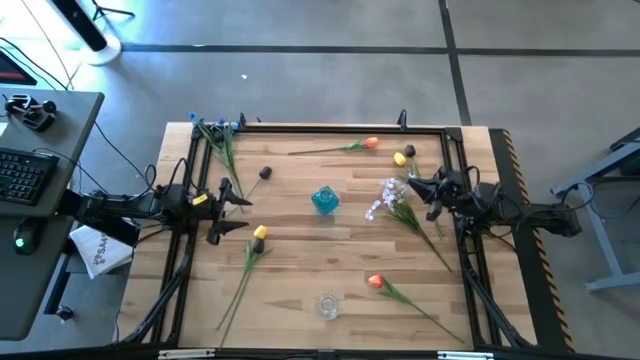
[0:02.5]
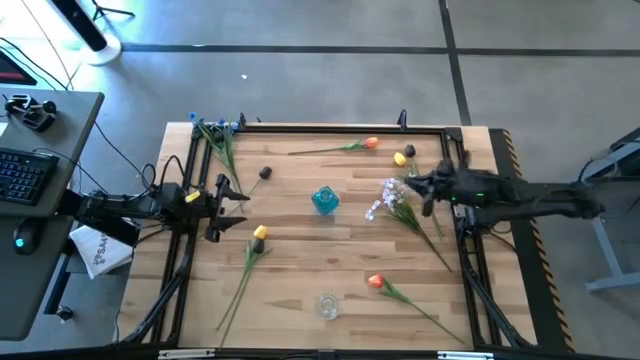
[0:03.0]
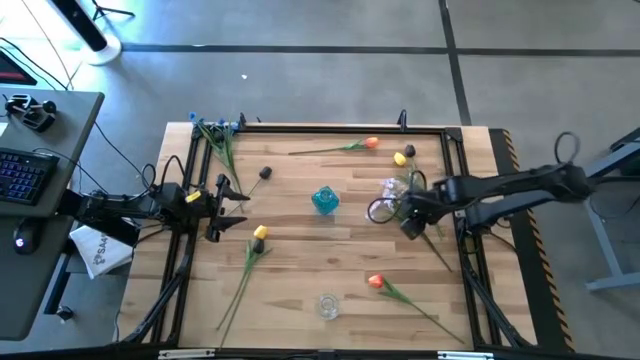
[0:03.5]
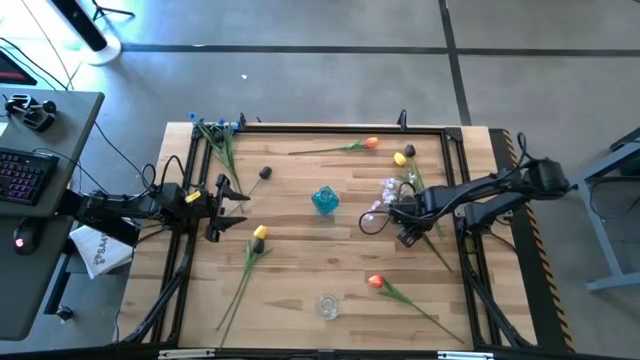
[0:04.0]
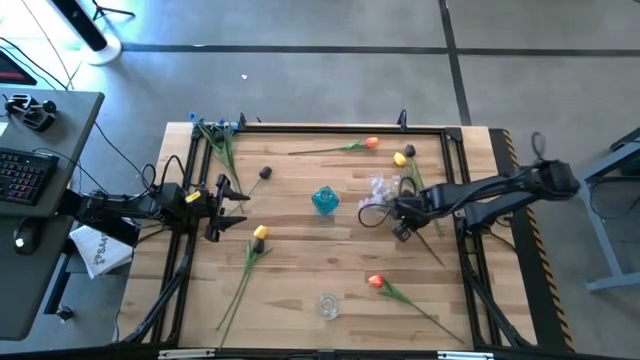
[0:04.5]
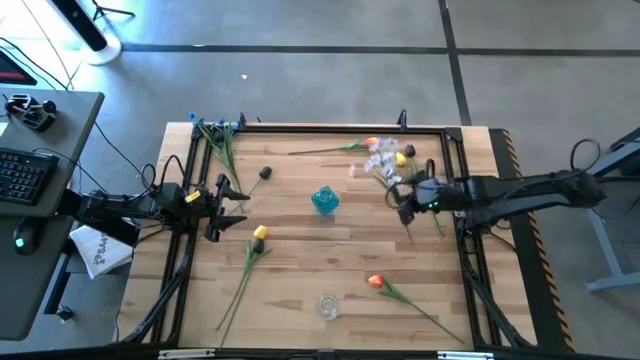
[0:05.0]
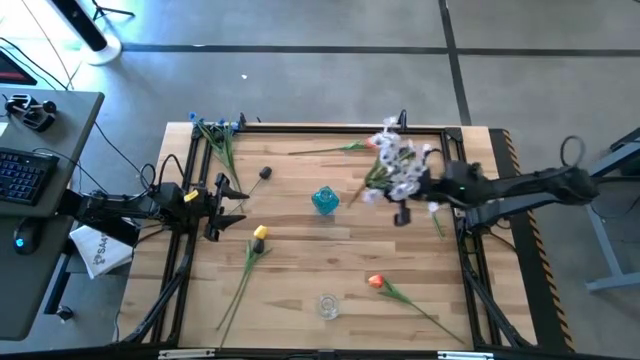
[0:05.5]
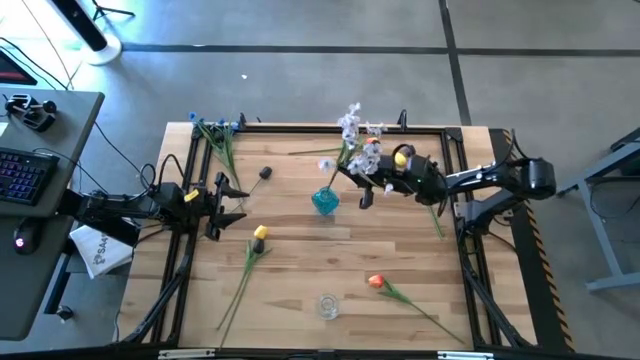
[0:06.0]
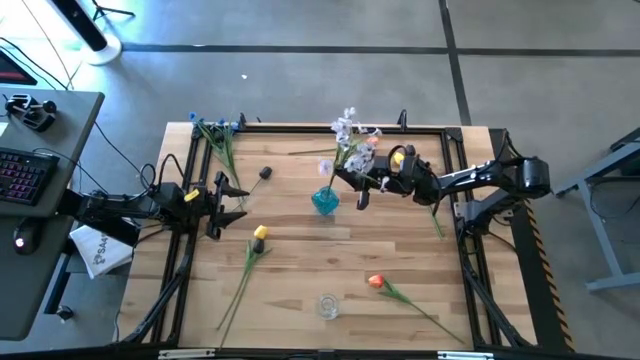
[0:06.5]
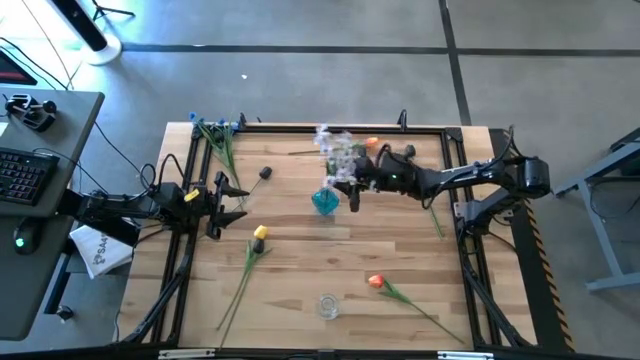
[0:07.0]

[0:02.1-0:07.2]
Task: Sort flowers into vase by color
Put the white flowers into the blue vase

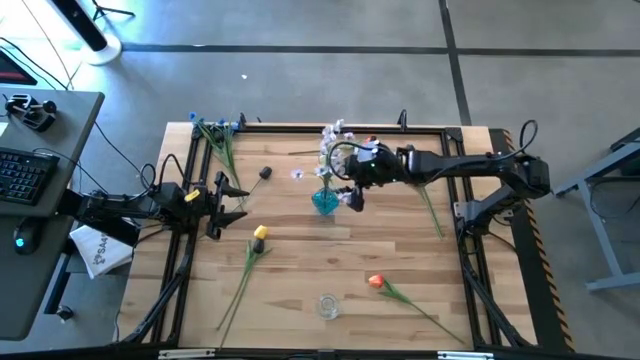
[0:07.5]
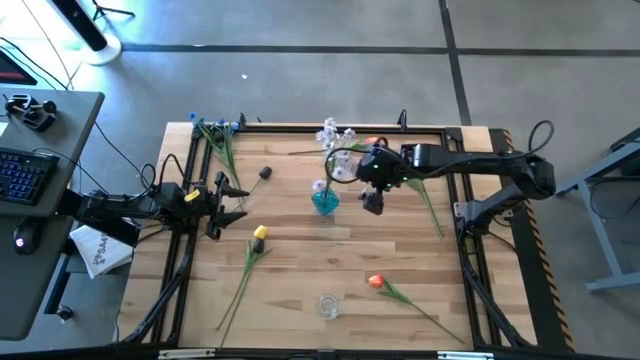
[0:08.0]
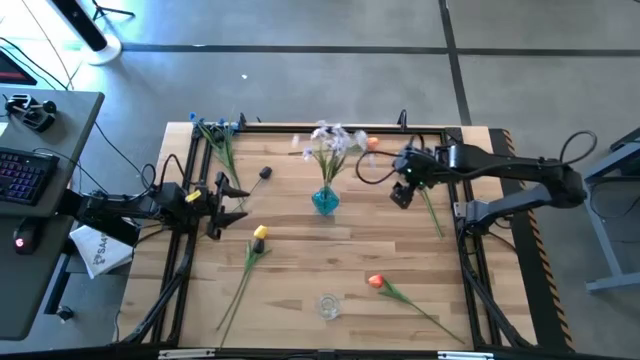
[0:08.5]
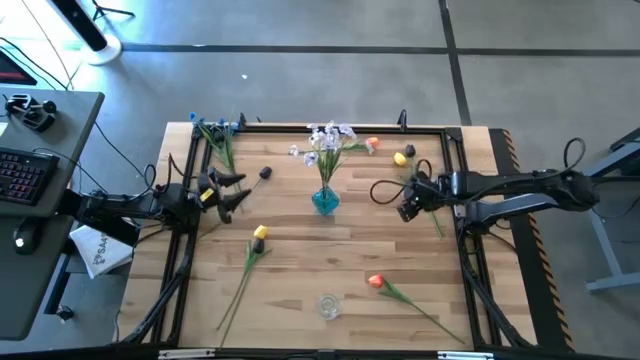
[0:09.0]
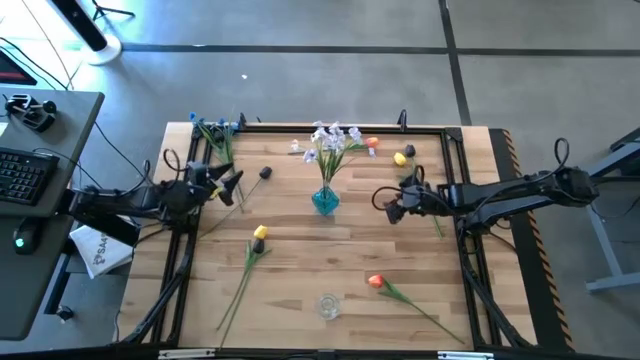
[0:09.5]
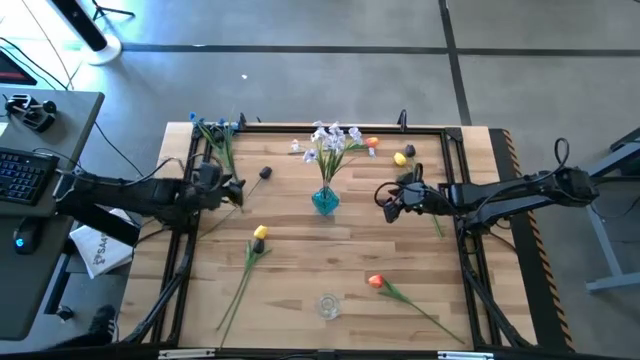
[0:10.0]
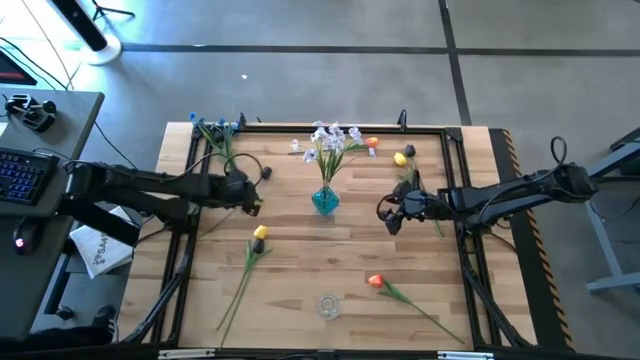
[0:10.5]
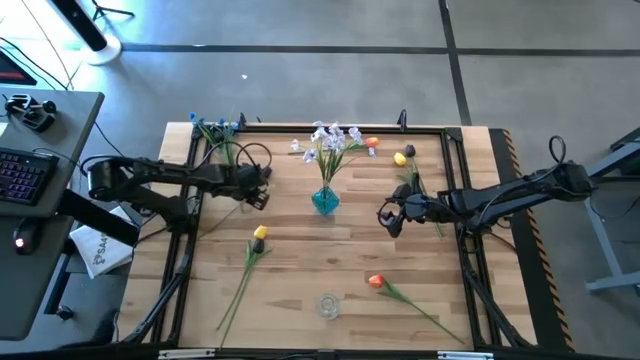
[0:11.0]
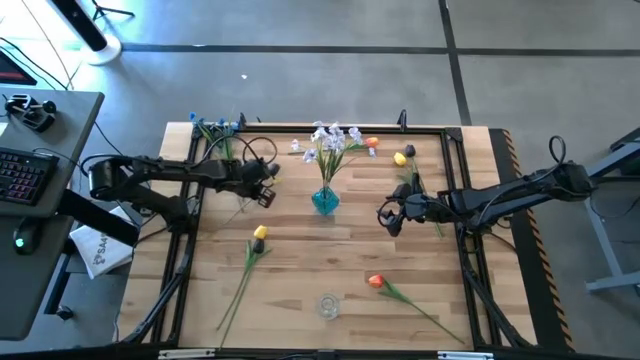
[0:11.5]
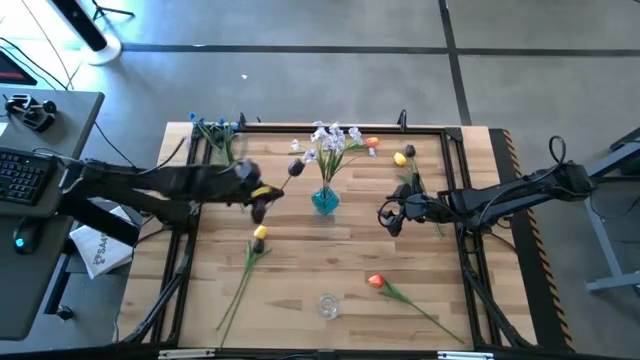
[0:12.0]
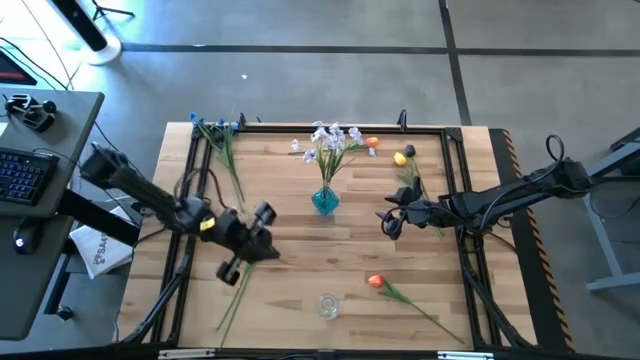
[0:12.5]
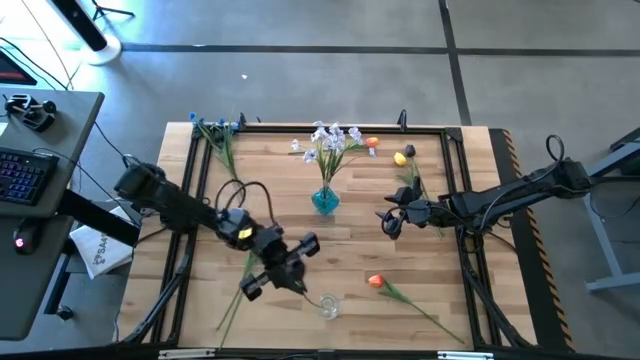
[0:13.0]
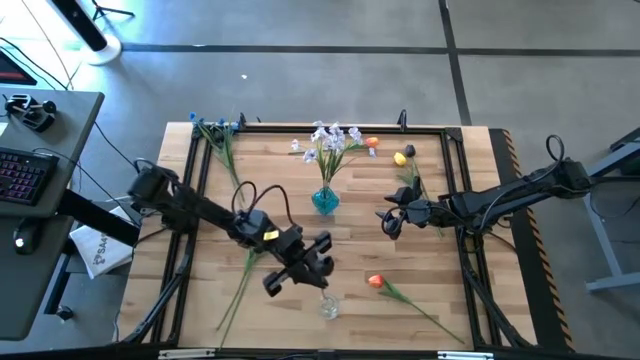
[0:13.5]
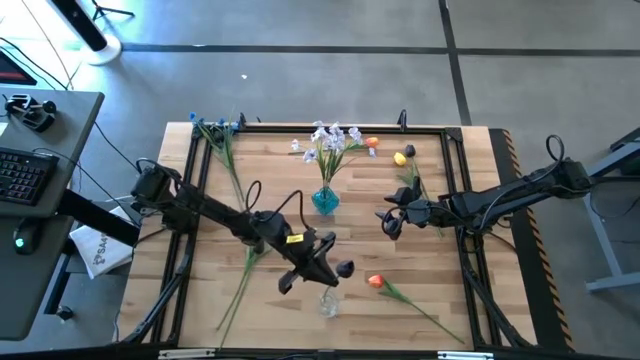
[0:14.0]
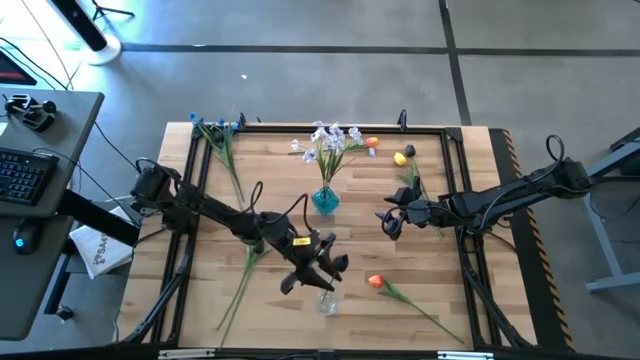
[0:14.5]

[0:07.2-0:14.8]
Put the middle black tulip into the transparent vase

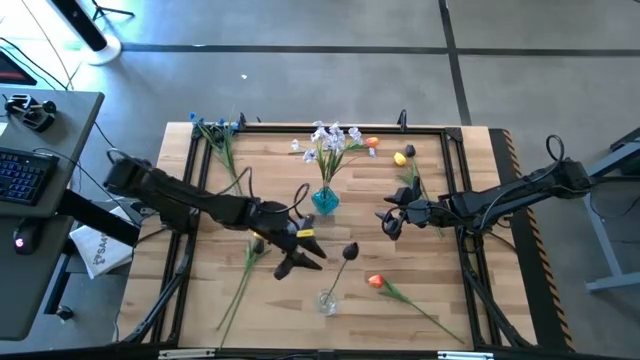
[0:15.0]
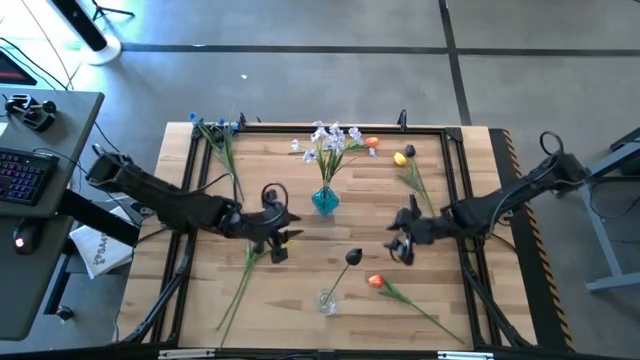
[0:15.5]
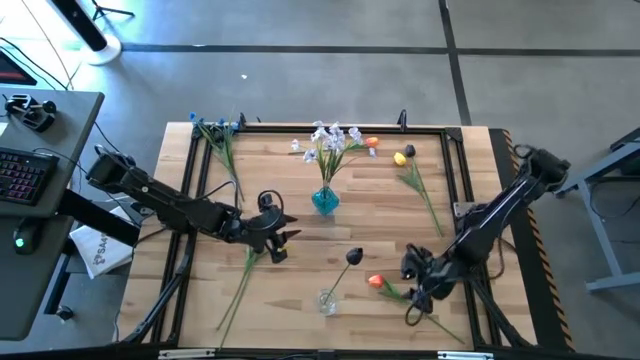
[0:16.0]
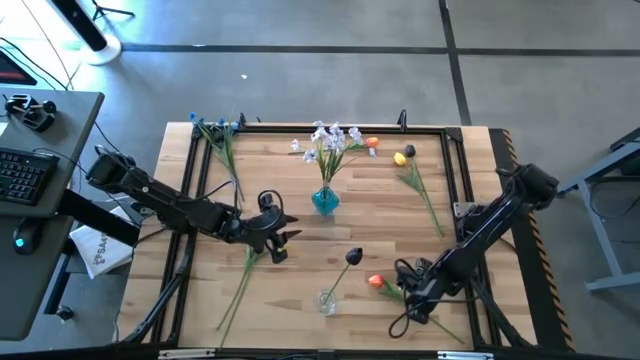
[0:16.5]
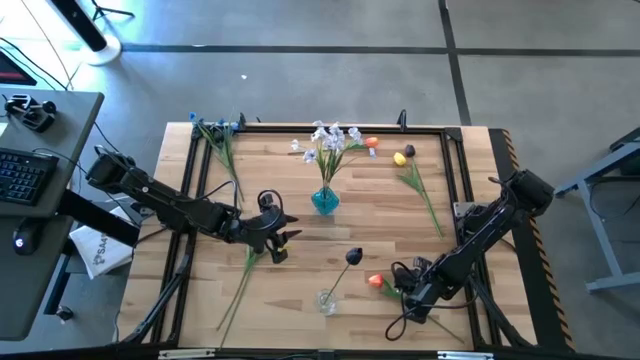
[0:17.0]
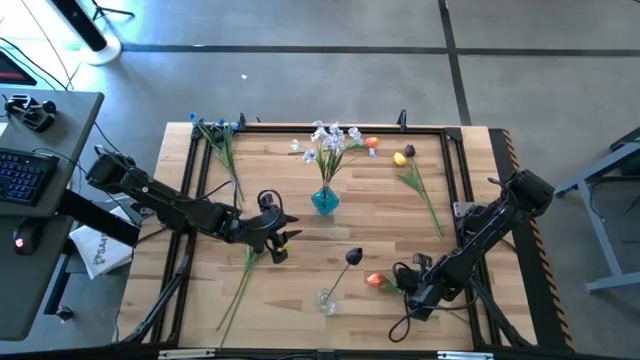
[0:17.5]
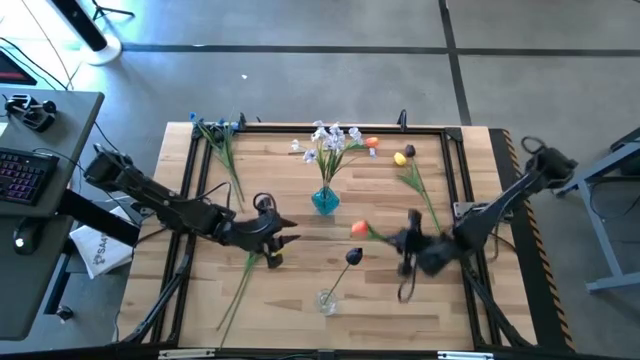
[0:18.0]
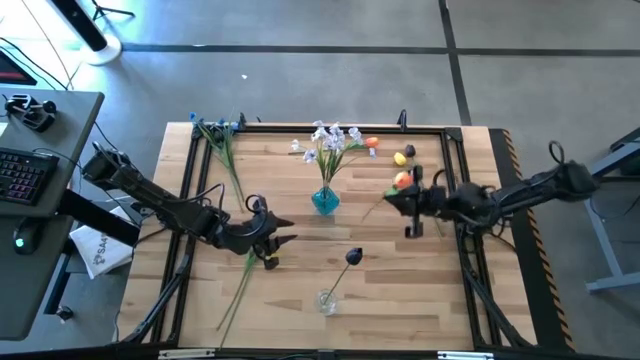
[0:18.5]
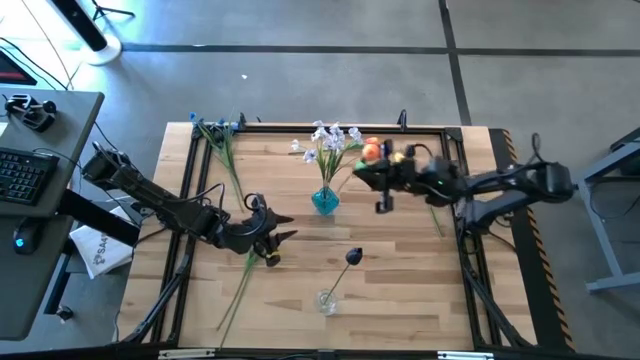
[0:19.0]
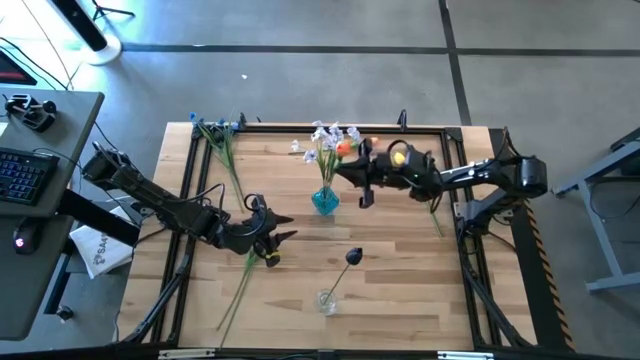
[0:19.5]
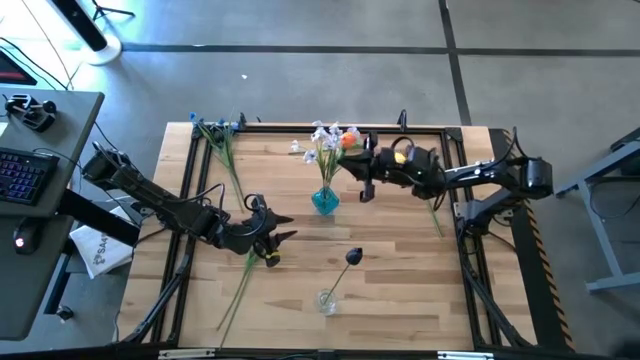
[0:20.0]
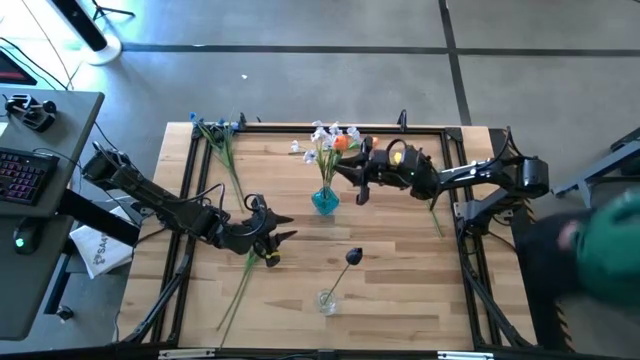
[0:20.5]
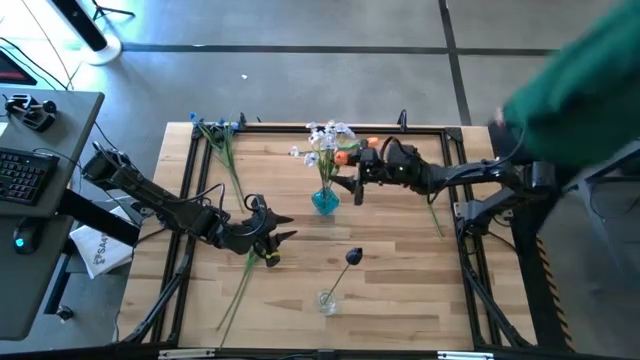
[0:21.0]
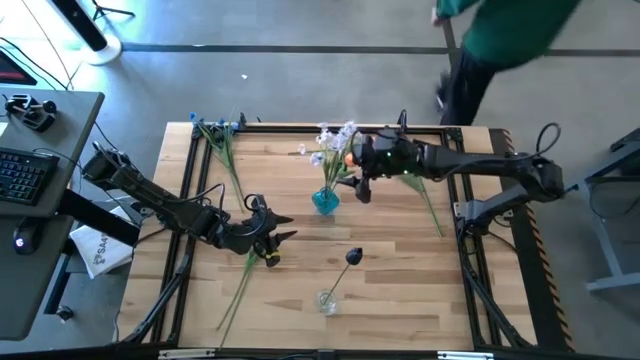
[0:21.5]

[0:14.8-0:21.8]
Put the bottom orange tulip into the blue vase

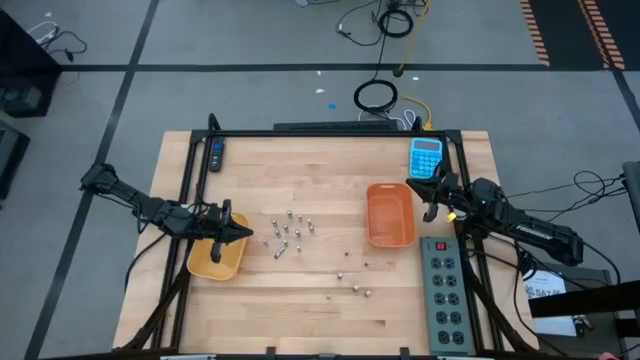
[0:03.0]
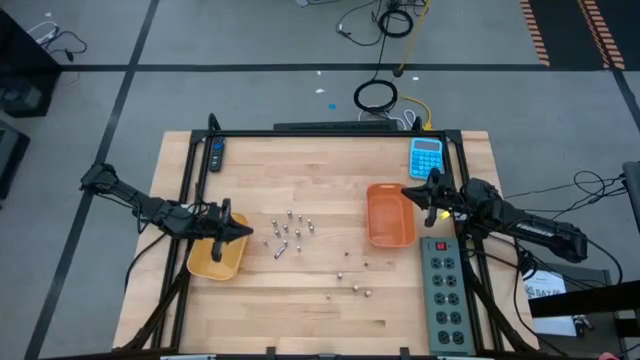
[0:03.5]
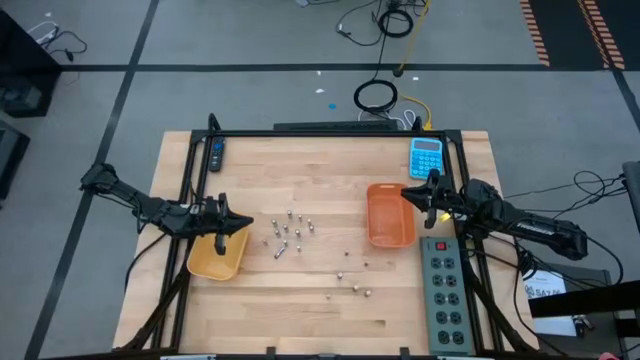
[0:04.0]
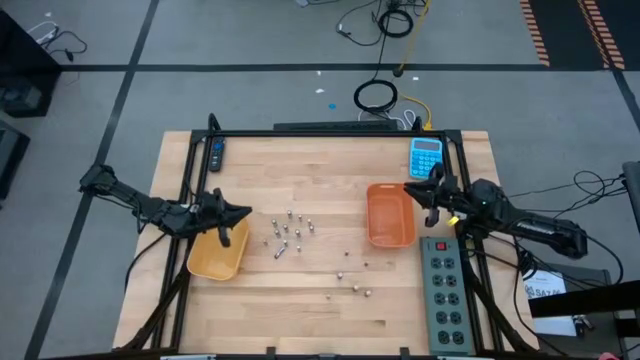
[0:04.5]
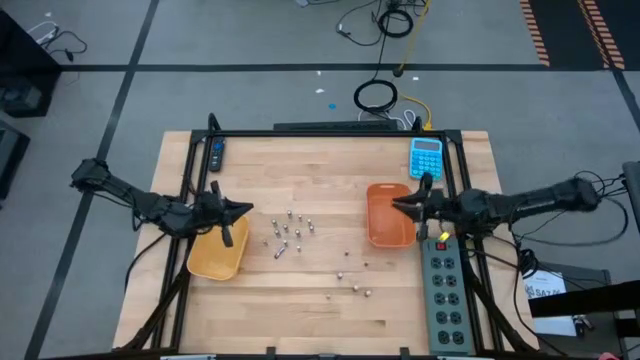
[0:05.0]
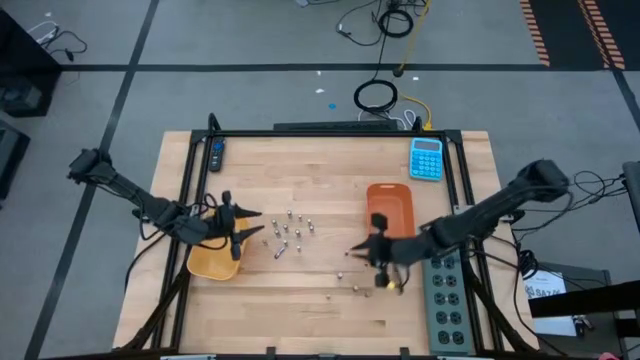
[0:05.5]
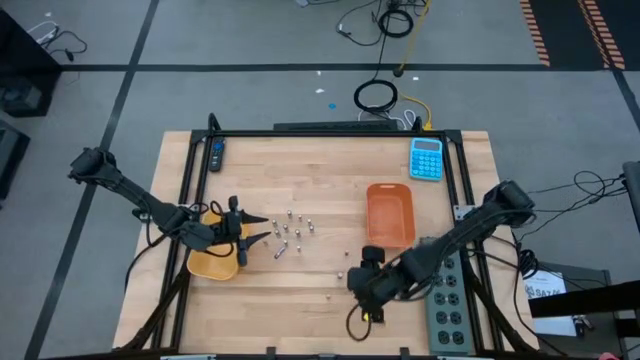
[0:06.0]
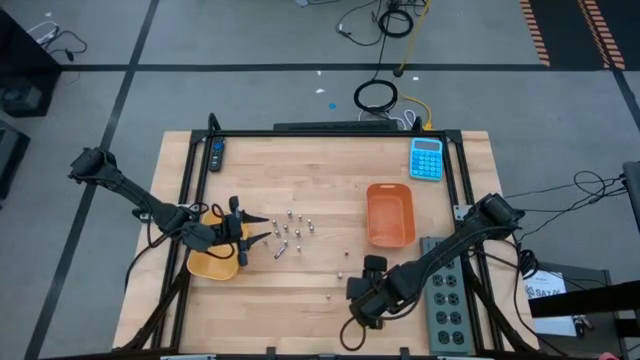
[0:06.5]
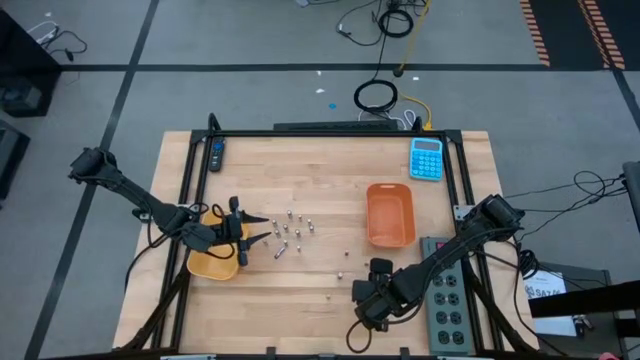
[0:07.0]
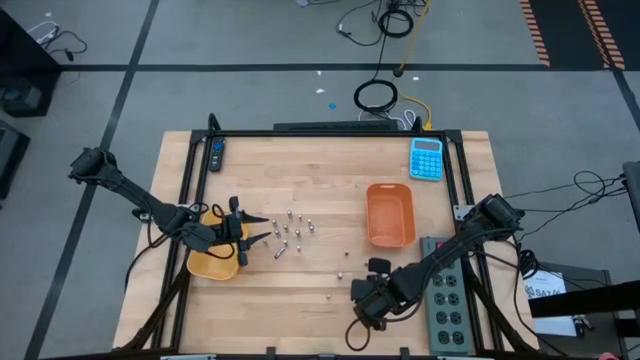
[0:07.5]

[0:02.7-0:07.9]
Task: Sort batteries
Put the black-brown battery into the orange bin
